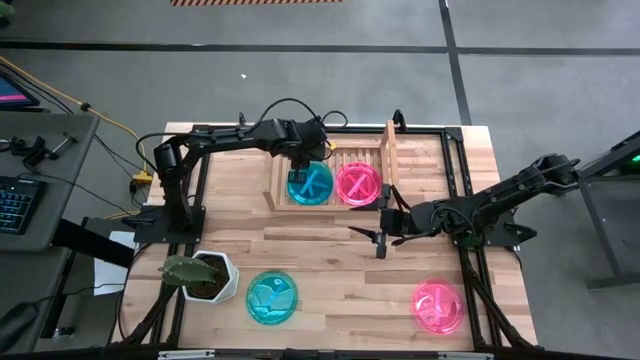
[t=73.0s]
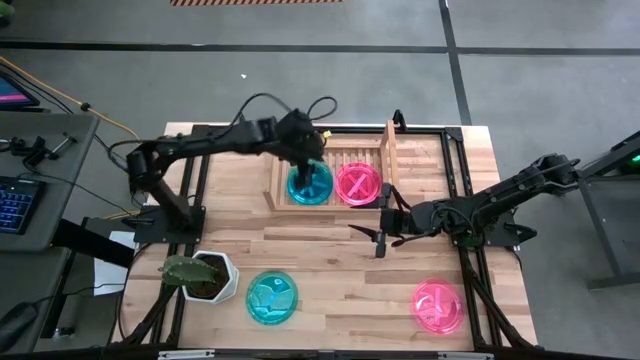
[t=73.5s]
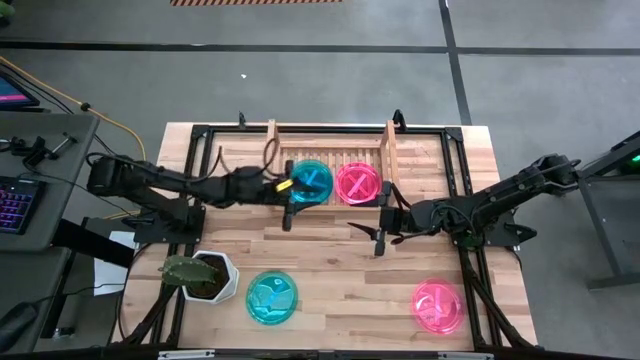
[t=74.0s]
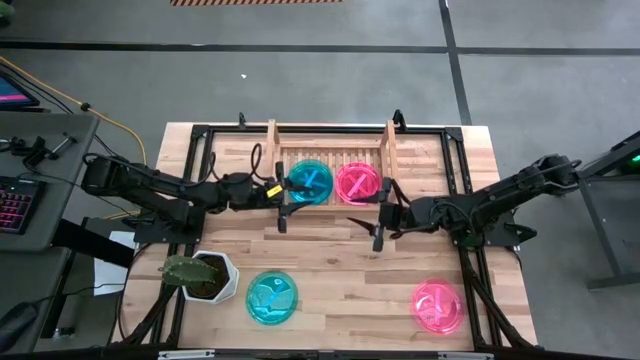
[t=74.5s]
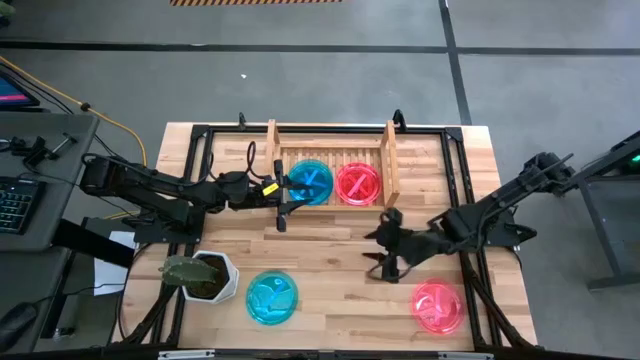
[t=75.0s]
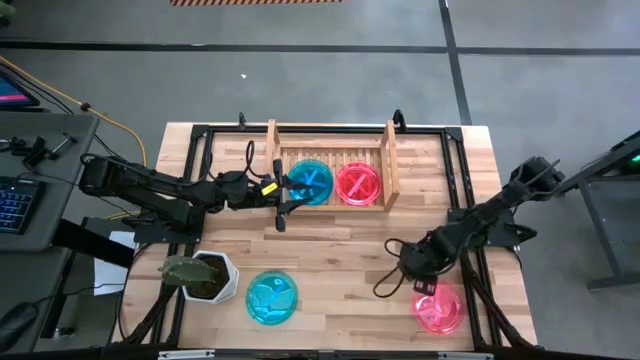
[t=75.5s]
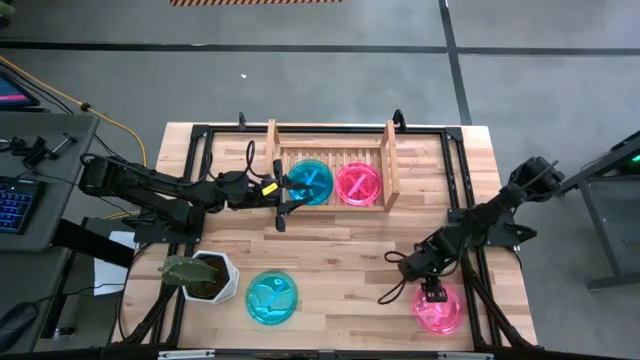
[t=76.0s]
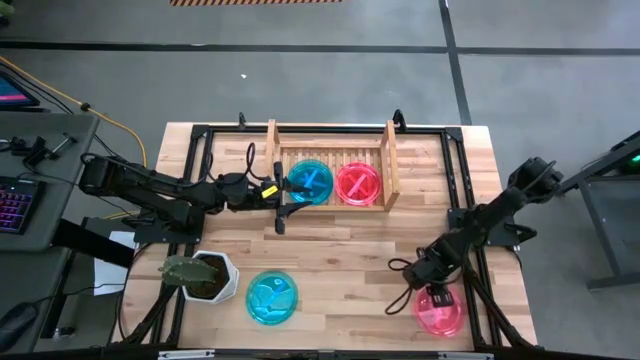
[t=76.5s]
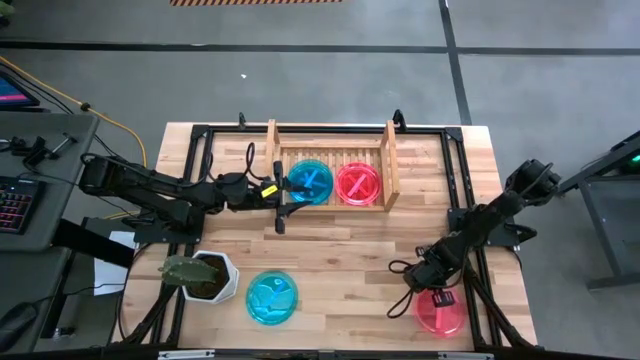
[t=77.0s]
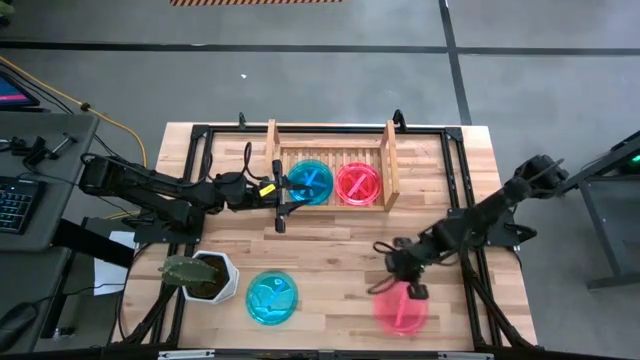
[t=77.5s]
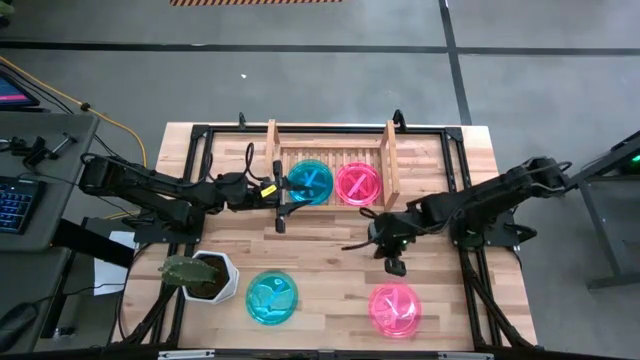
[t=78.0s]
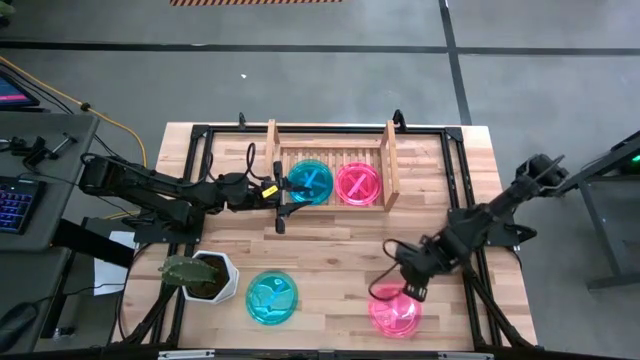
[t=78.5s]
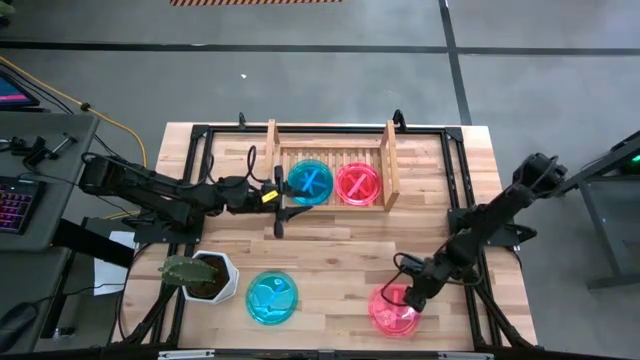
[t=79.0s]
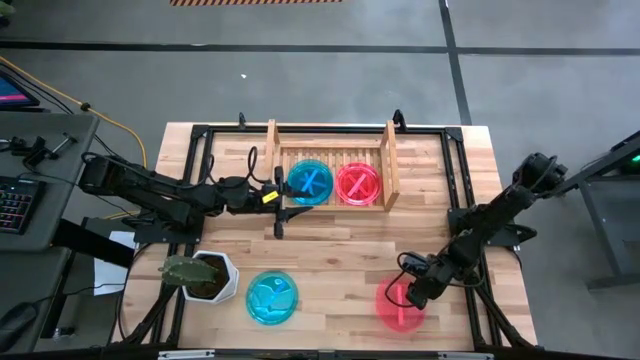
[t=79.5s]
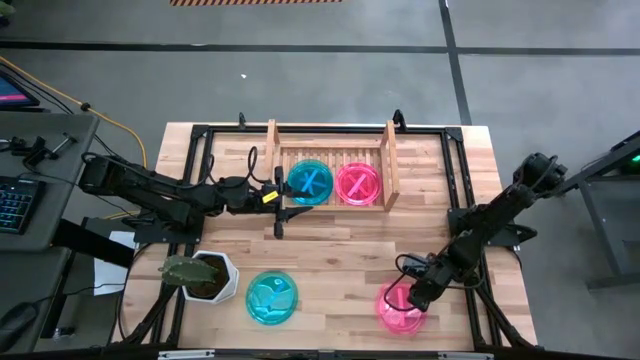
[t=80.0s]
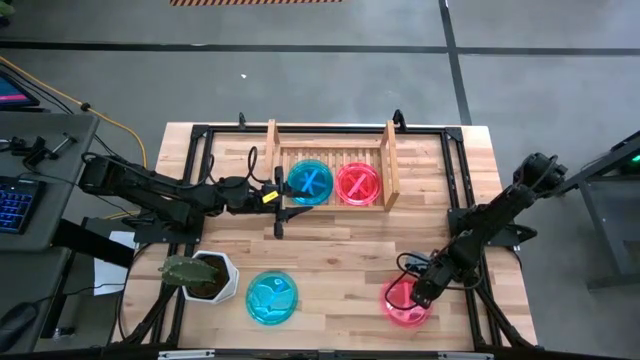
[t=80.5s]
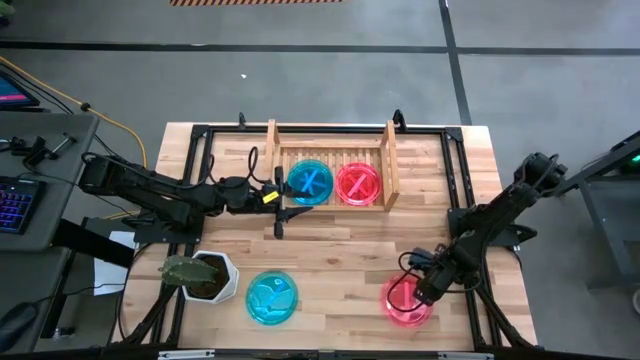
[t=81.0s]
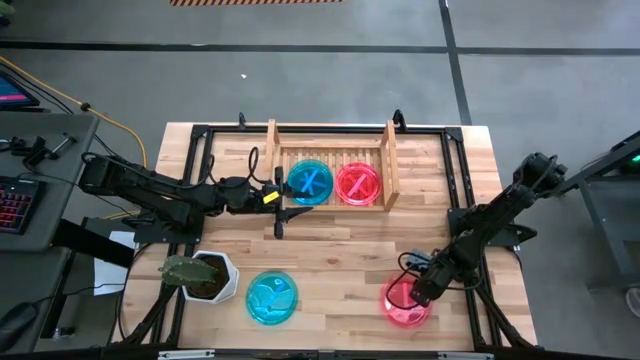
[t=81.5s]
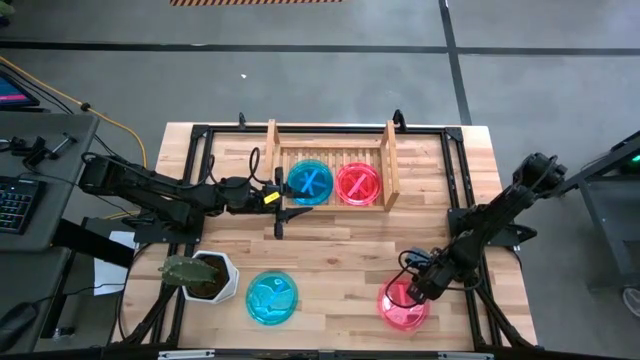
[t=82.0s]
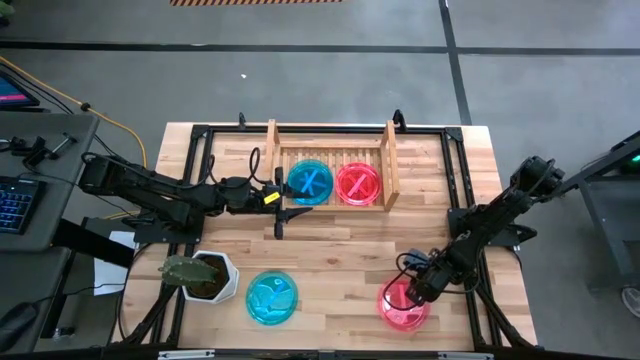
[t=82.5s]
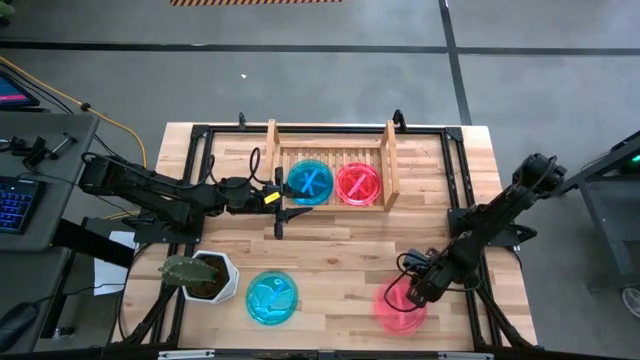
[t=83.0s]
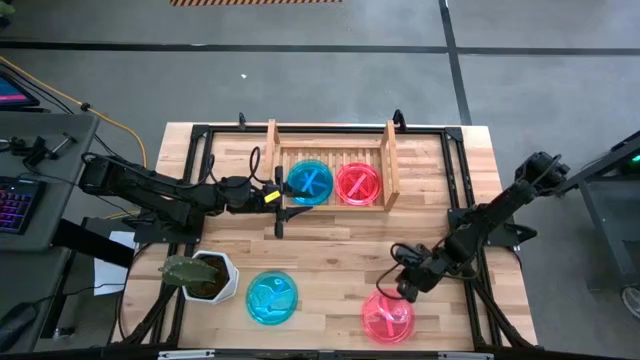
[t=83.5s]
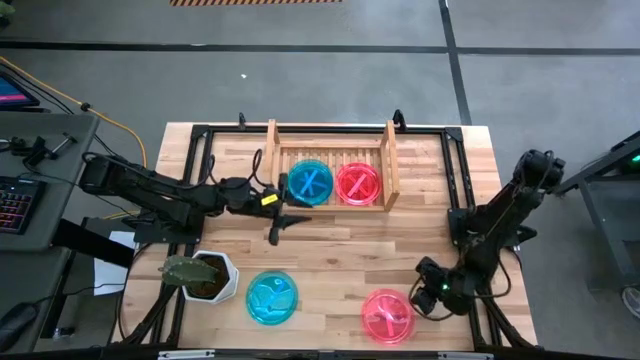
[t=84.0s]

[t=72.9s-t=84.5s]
Task: Place and stack plates onto a shelf
Stack the pink plate on top of the pink plates on the shelf

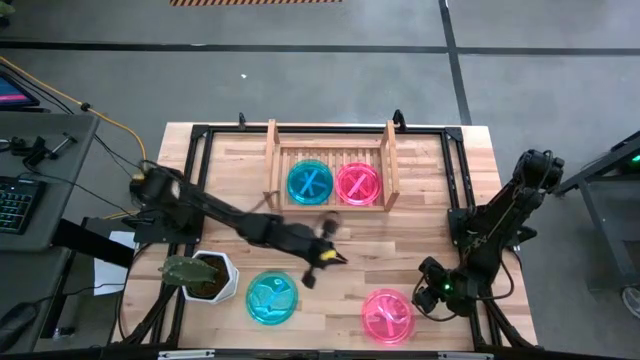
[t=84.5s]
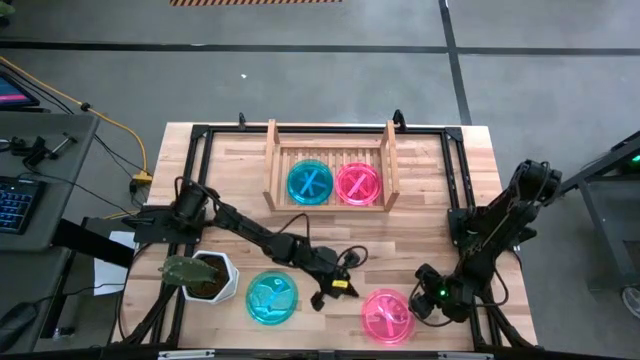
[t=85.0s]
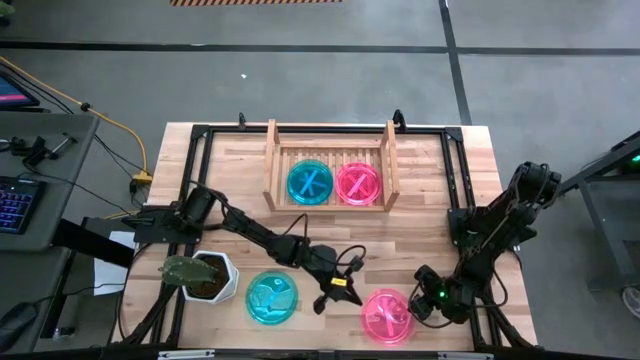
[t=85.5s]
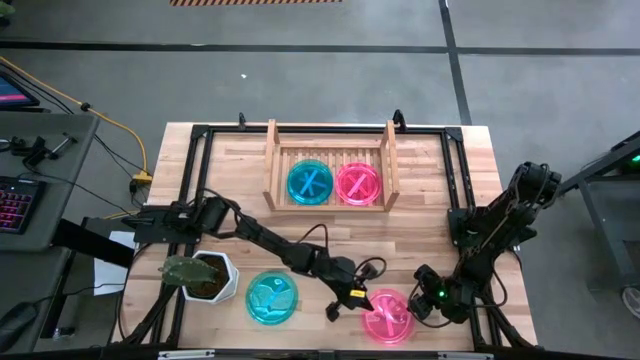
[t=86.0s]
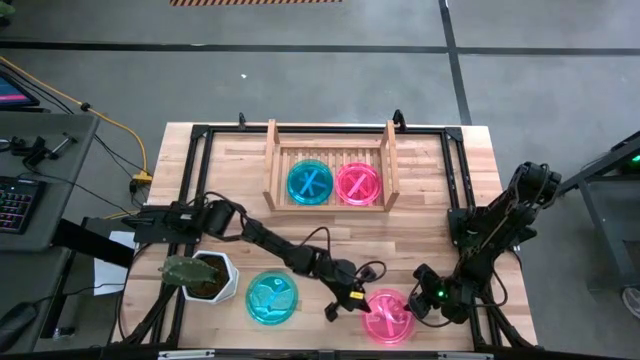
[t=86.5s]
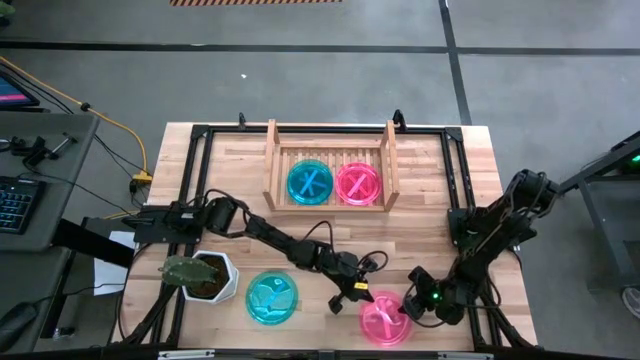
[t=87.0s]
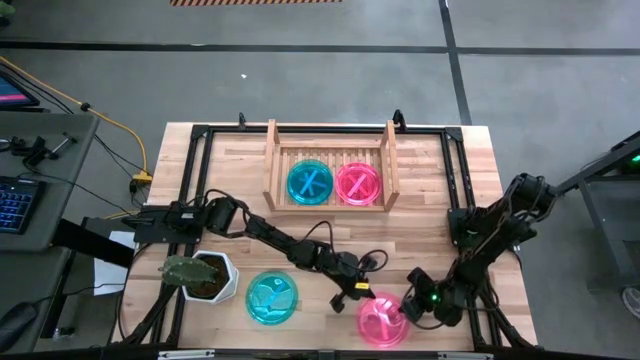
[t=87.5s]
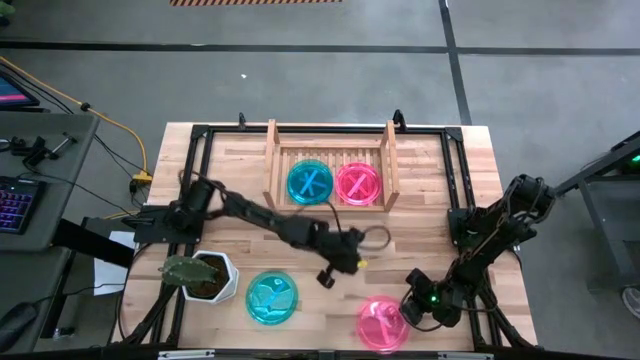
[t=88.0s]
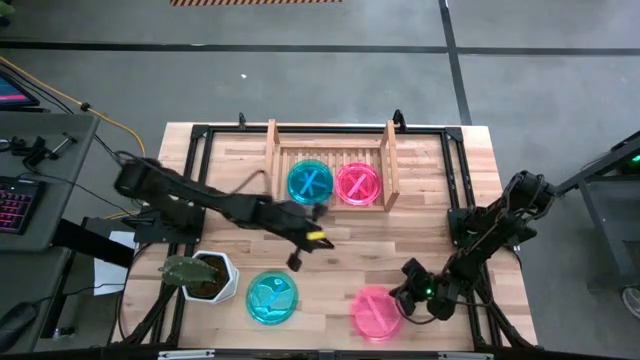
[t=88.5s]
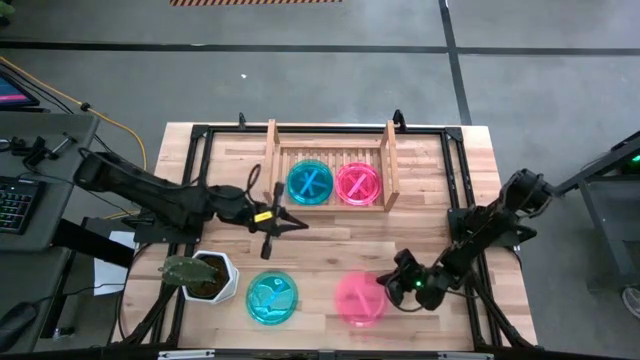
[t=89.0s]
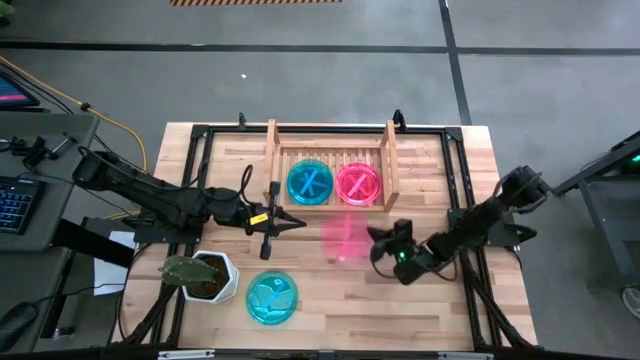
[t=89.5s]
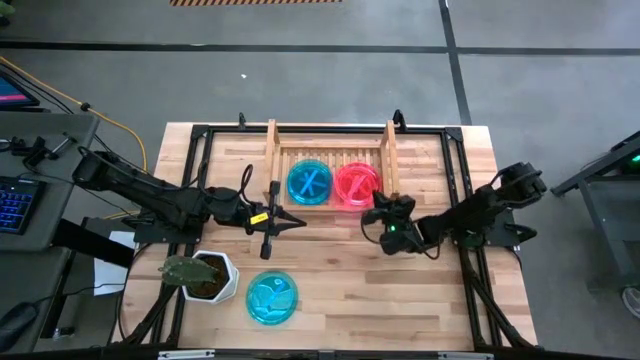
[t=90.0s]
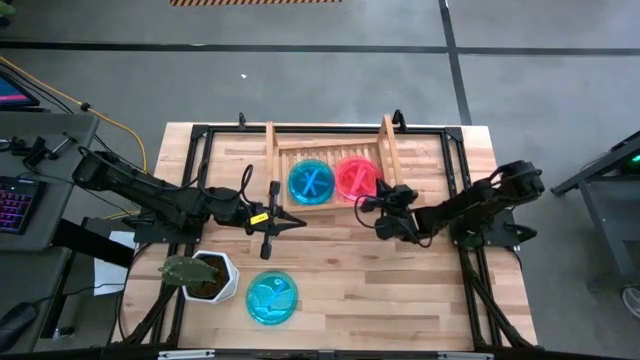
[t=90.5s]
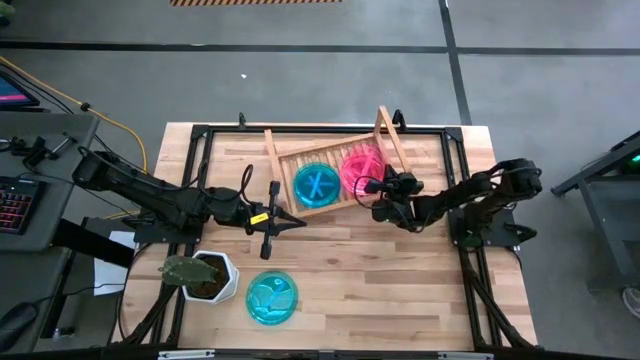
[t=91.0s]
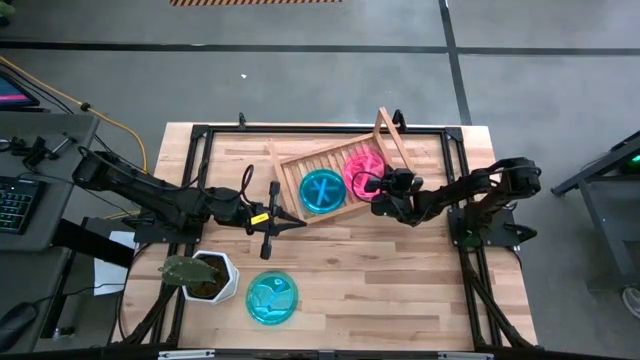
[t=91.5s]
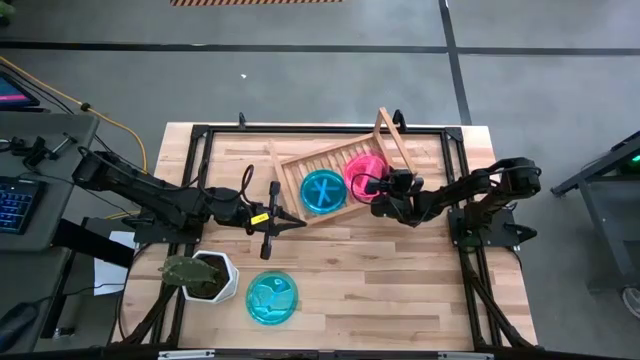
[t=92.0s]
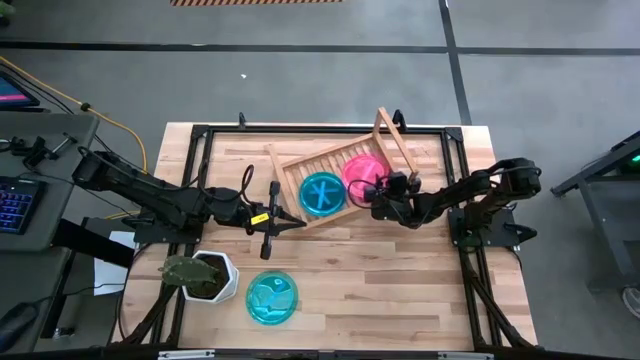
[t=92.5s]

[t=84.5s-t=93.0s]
Stack the pink plate on top of the pink plates on the shelf

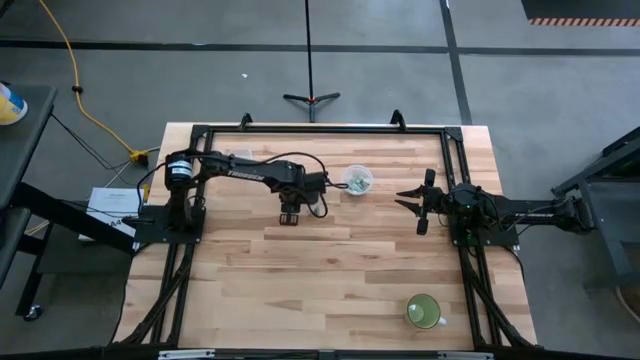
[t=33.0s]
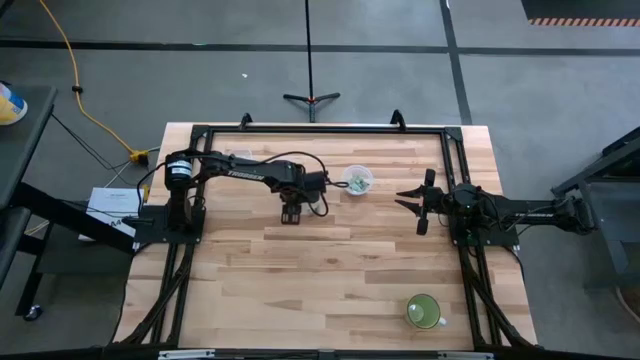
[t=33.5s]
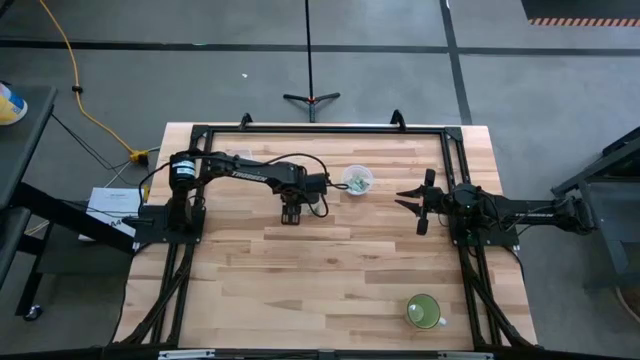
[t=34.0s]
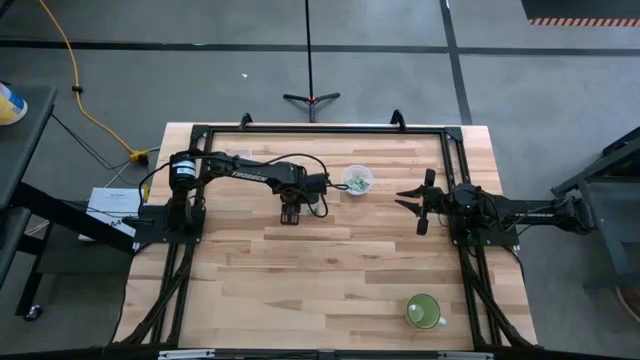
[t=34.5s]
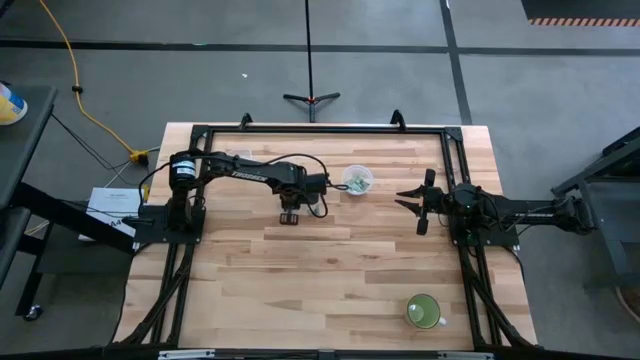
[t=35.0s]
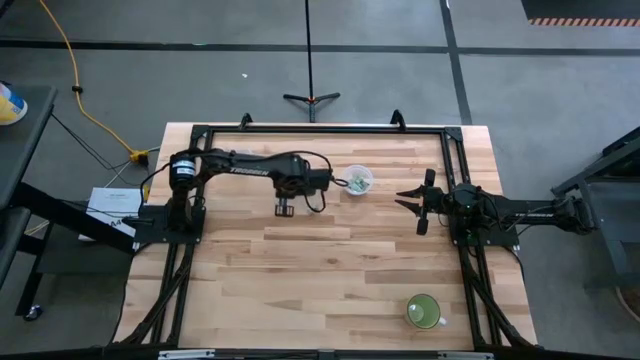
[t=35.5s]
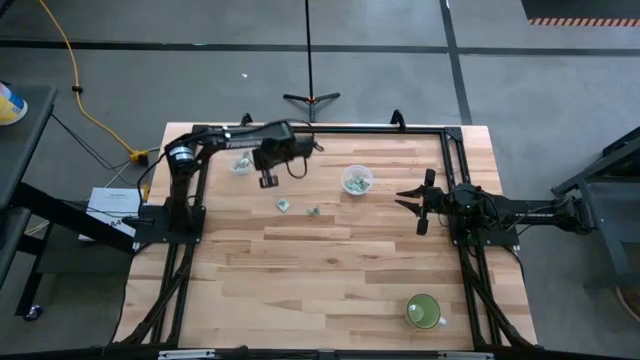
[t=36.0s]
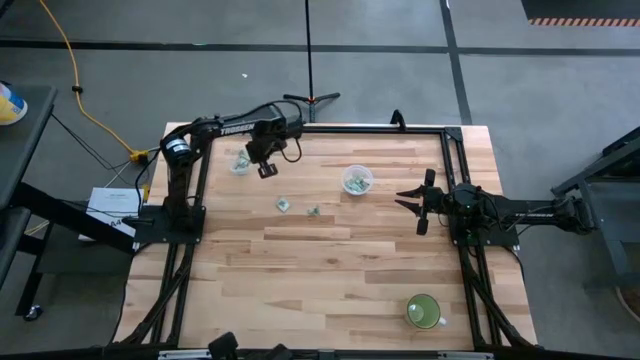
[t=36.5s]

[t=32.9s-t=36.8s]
Task: Pick and place Stevia / Truvia into bins
Put the stevia packet into the top transparent container
